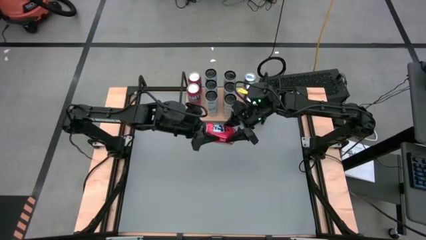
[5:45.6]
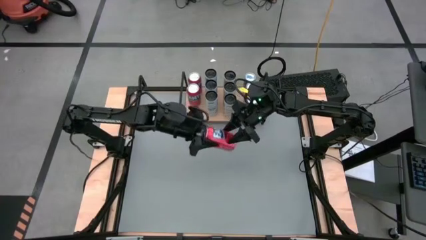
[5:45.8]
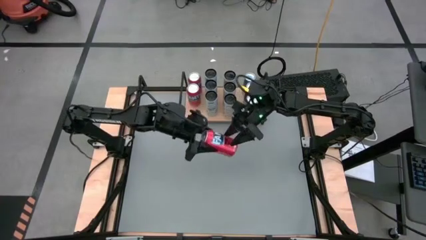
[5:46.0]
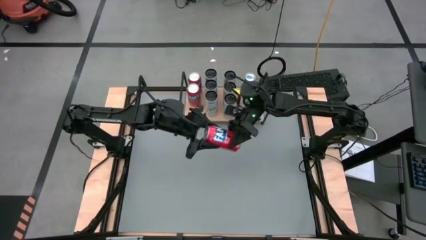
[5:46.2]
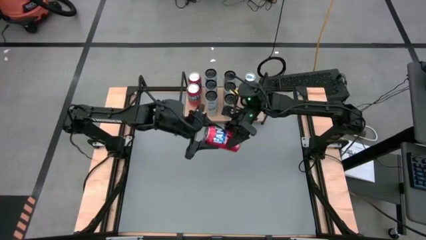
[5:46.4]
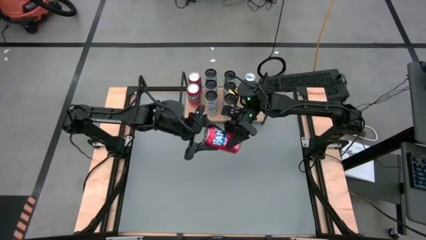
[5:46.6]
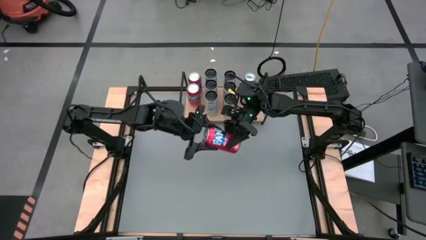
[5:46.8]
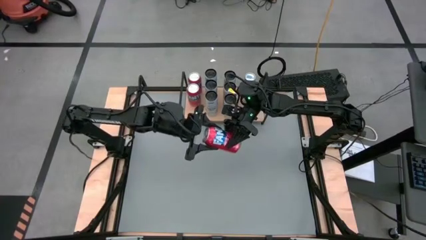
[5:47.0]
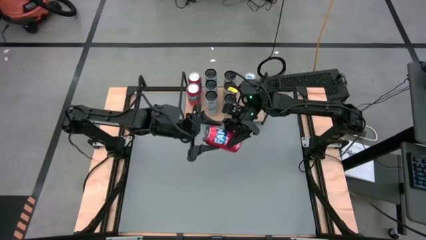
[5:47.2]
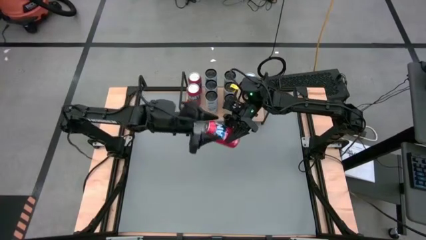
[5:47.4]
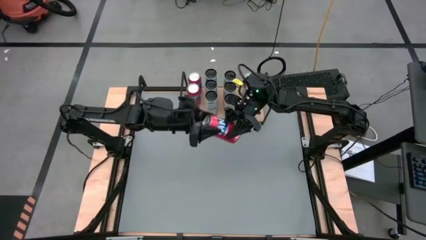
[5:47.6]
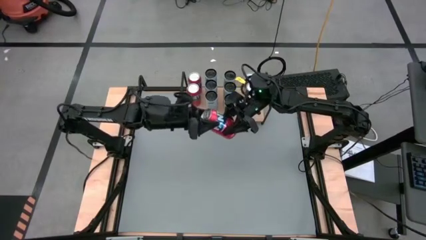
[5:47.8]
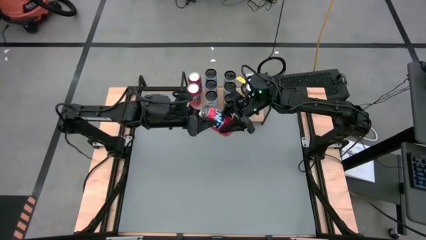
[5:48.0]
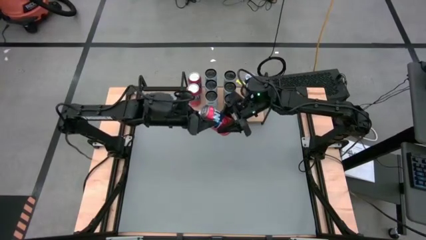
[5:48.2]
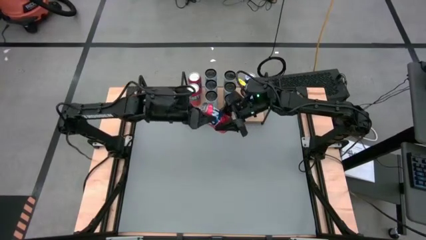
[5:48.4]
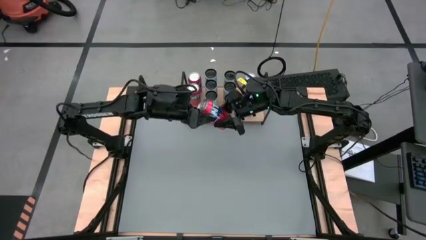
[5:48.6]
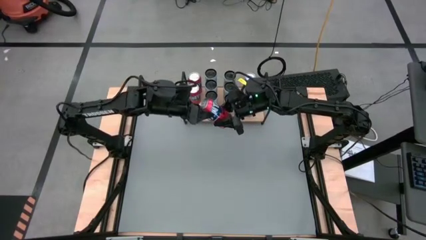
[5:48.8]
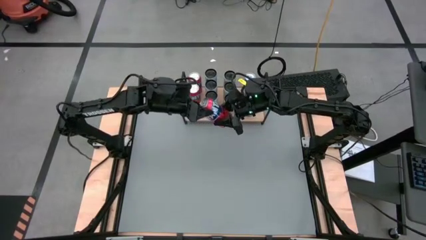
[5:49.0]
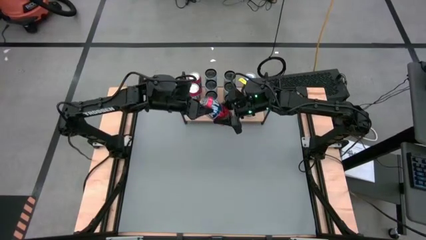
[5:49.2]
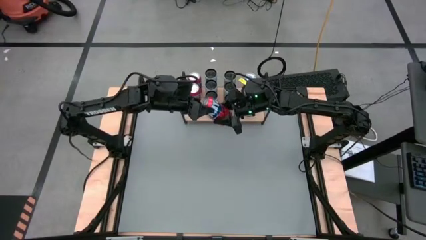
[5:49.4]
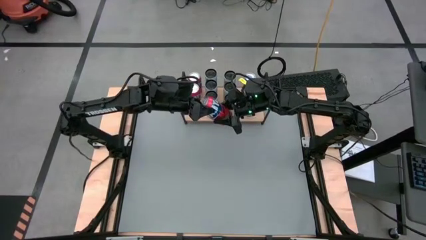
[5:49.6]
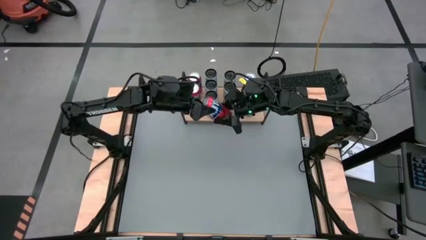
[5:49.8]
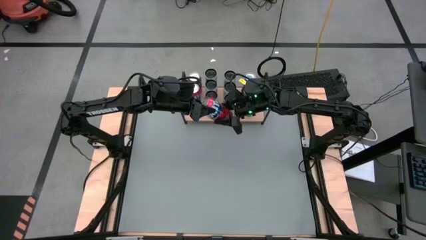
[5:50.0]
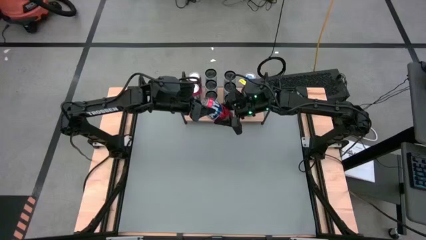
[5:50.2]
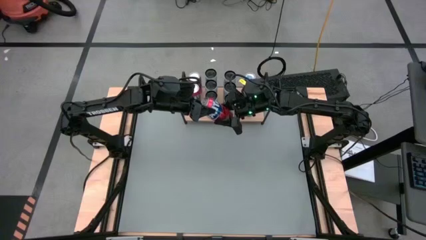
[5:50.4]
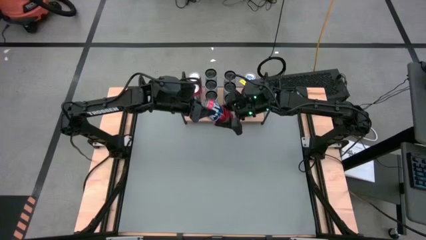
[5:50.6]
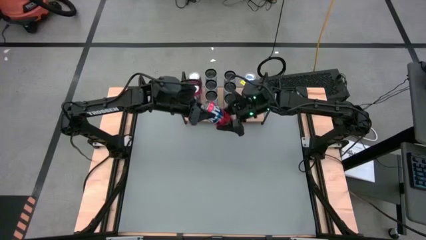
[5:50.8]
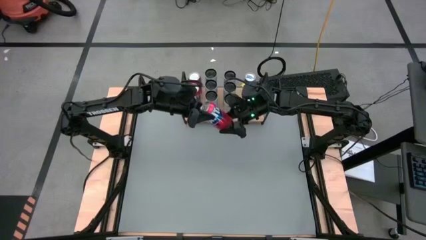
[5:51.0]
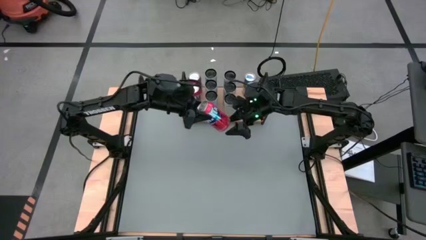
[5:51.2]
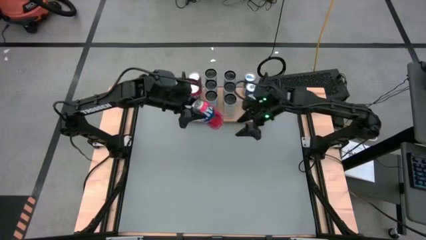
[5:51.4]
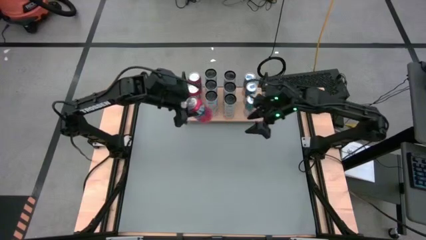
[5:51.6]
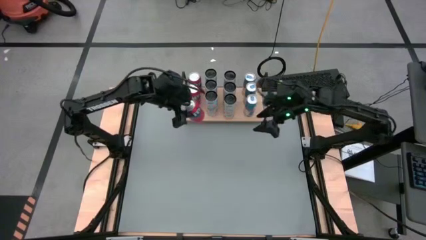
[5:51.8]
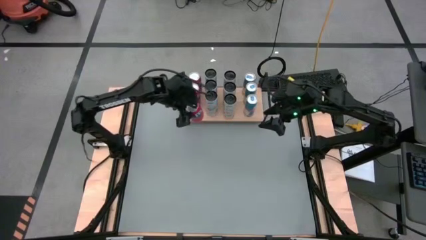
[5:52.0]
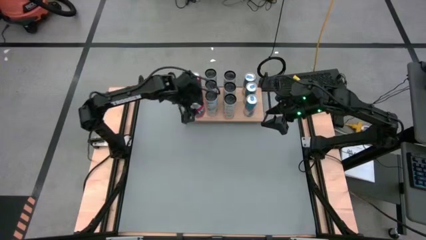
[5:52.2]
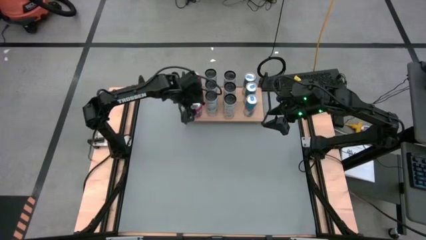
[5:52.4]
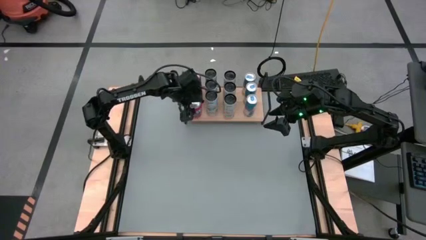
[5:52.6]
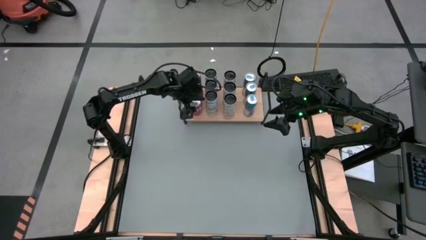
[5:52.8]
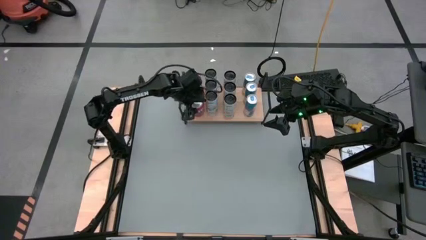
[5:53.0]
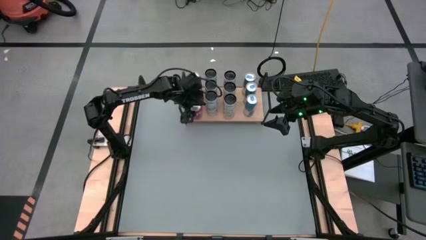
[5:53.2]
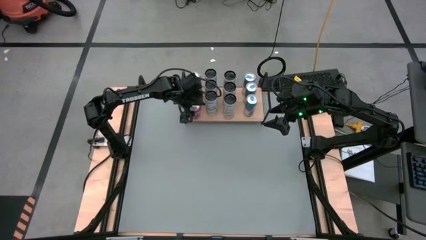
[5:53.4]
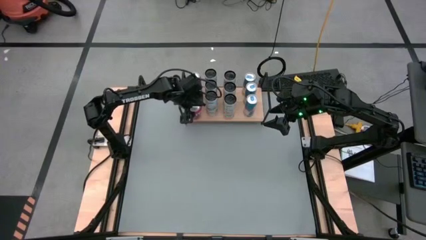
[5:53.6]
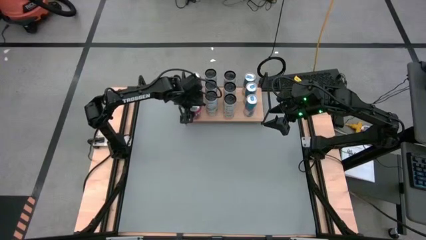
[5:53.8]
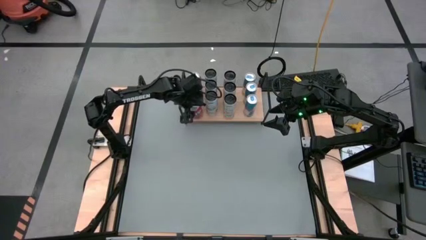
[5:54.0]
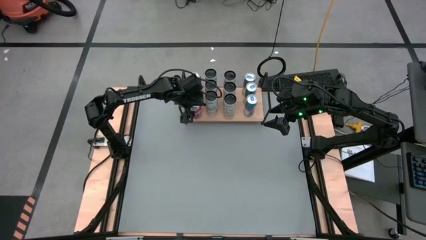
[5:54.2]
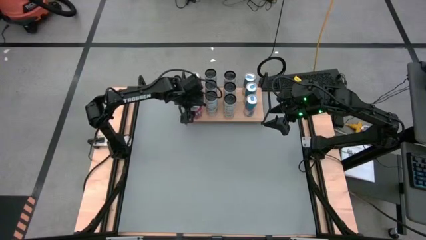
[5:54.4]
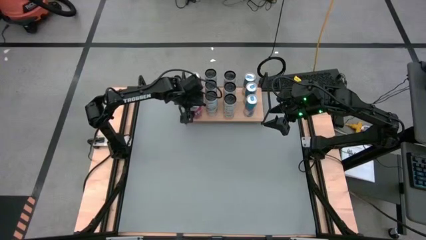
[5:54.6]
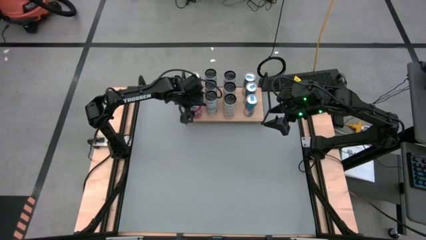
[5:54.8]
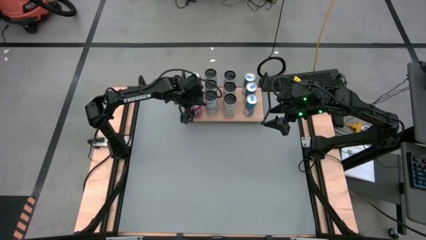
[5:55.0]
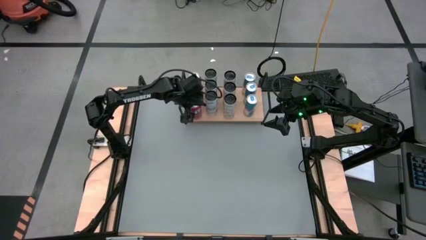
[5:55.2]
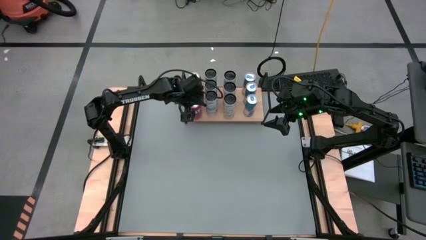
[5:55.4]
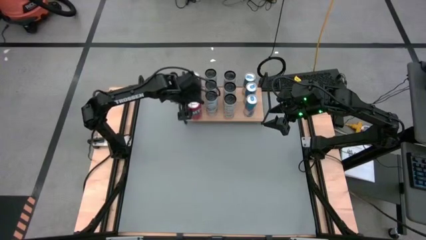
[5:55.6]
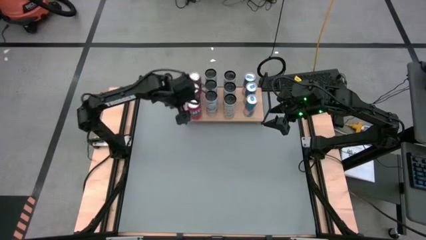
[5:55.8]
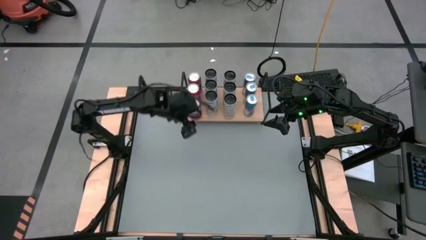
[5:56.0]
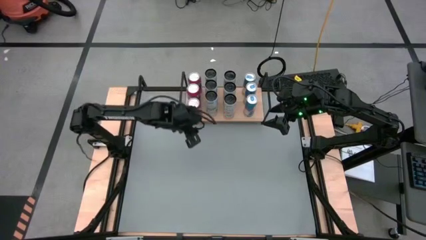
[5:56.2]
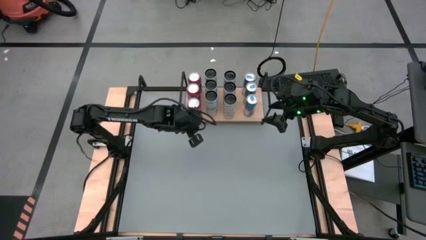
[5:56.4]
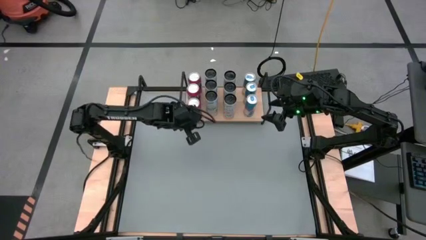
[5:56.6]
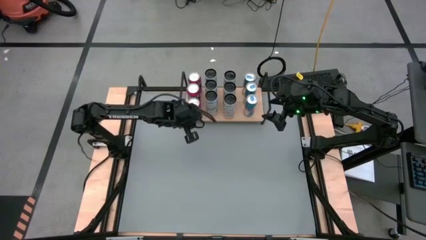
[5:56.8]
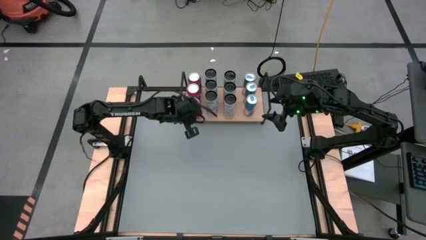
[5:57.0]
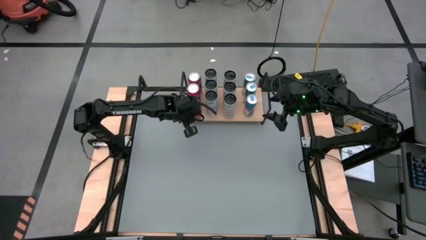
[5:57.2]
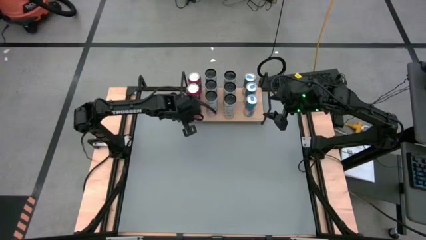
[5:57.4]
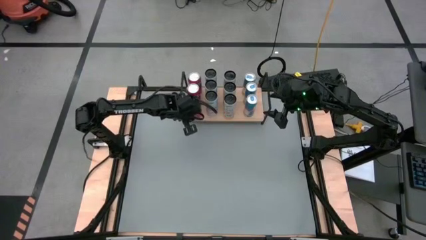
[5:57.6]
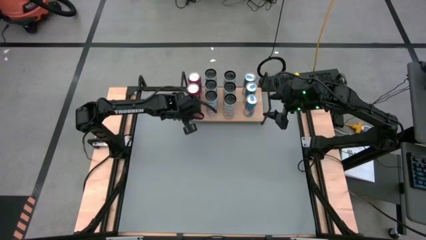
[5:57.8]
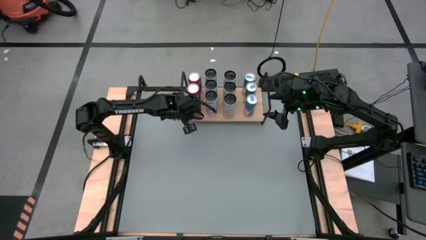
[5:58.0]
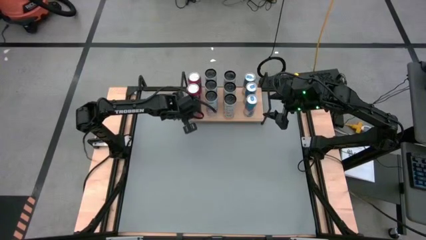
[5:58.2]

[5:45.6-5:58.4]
Task: Place canned beverage on shelf
Put the red soda can aligned with the other red soda cans on the shelf
